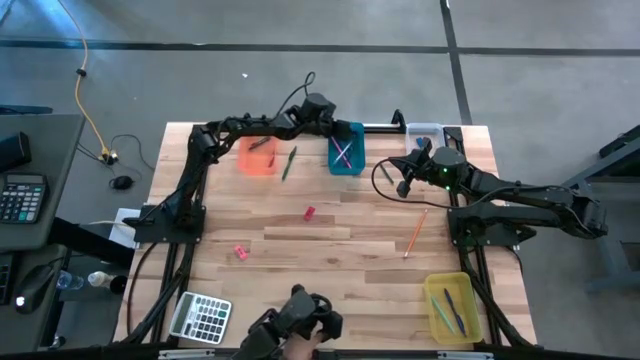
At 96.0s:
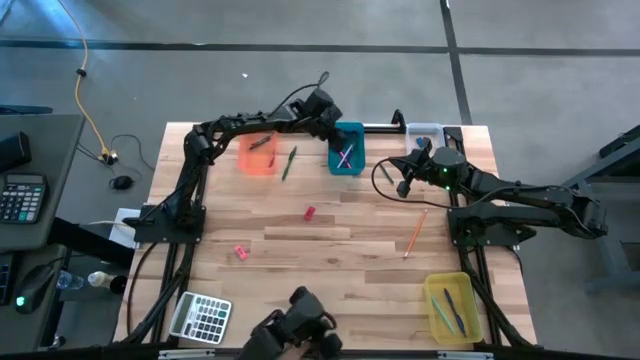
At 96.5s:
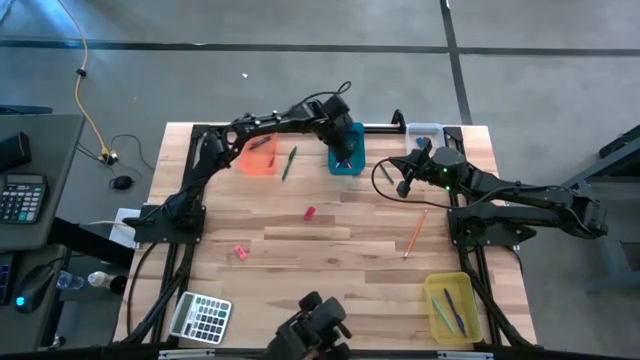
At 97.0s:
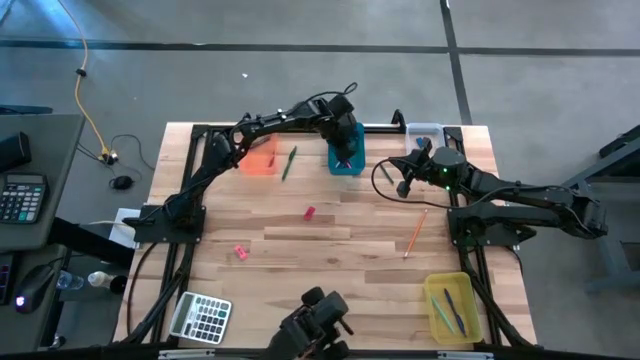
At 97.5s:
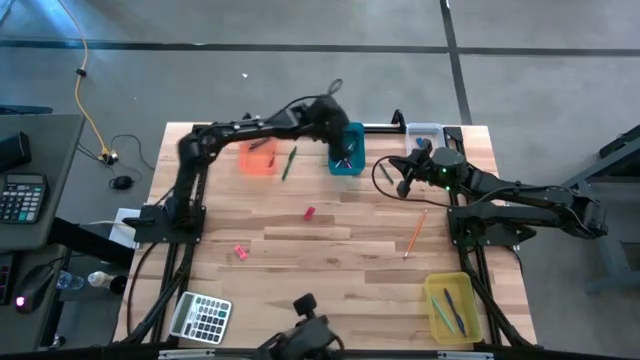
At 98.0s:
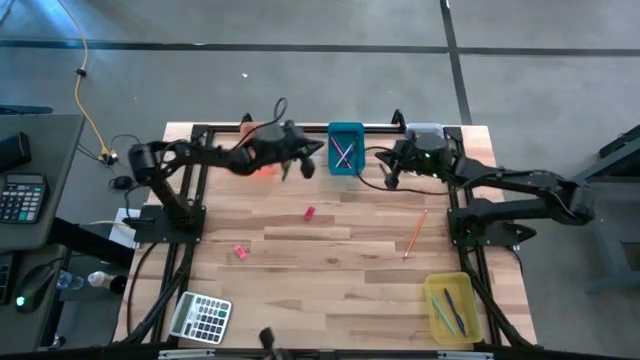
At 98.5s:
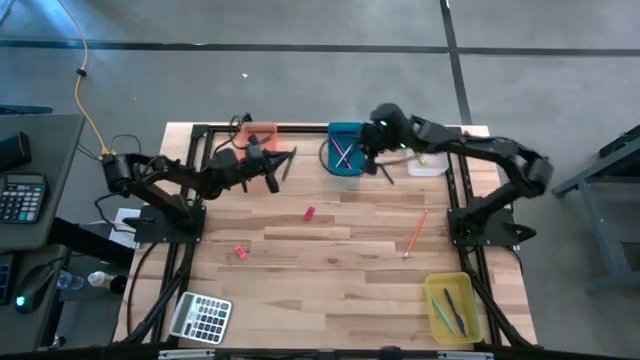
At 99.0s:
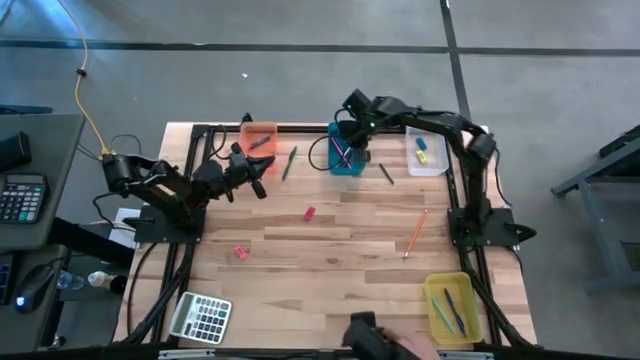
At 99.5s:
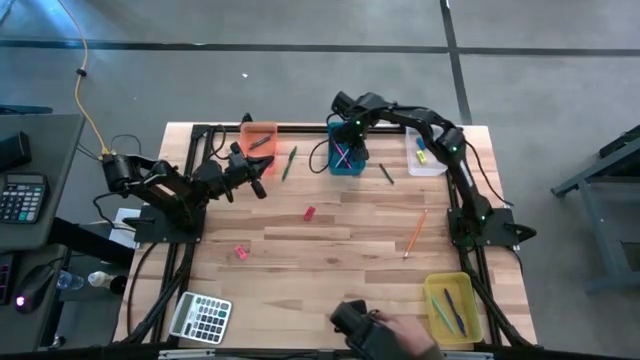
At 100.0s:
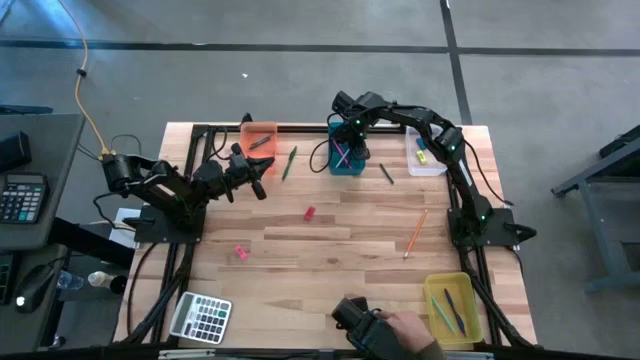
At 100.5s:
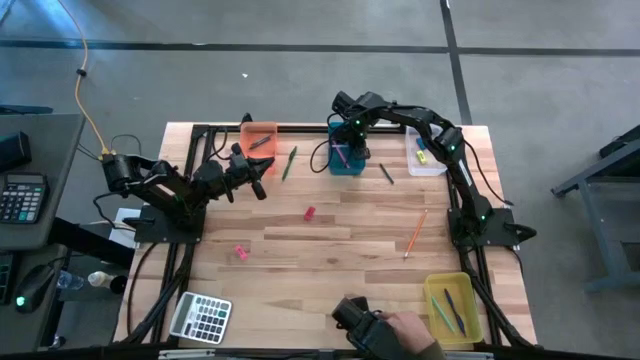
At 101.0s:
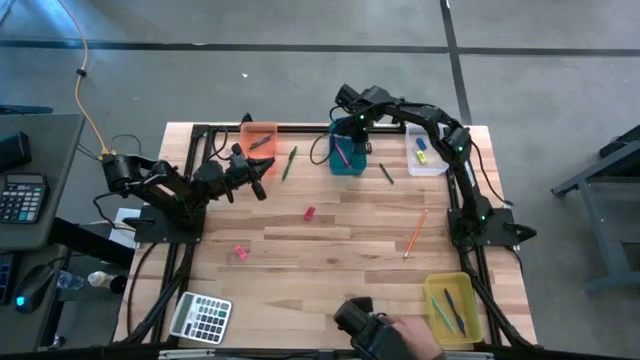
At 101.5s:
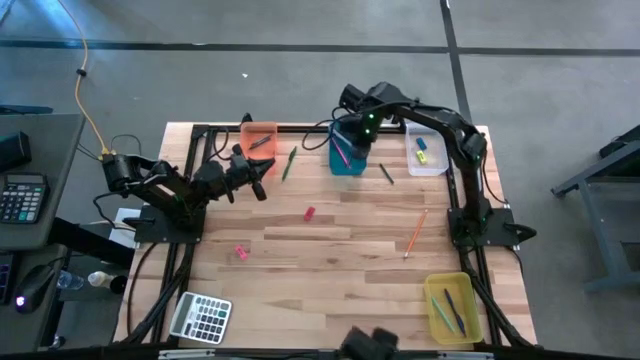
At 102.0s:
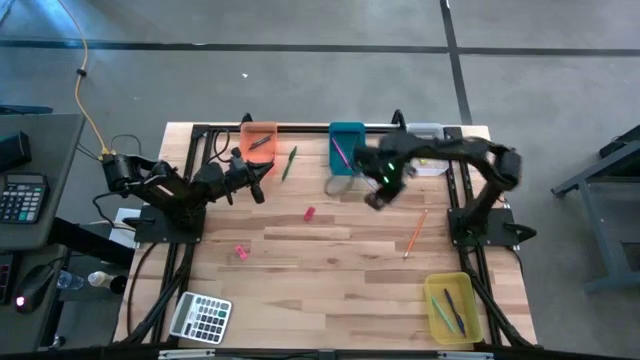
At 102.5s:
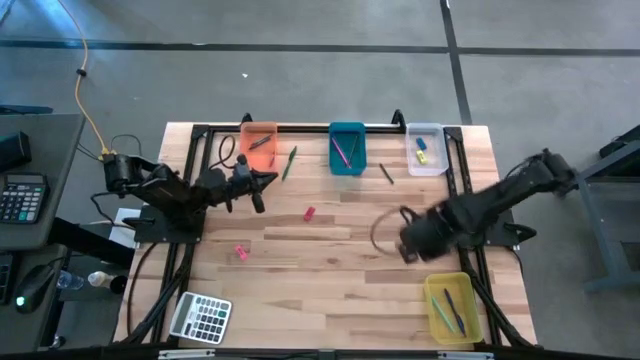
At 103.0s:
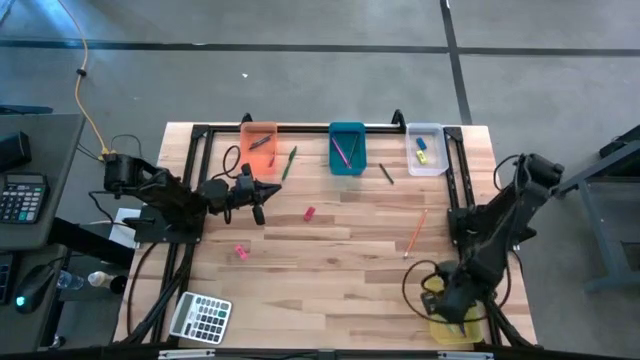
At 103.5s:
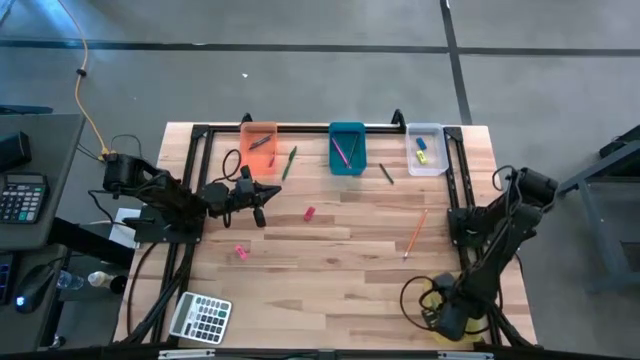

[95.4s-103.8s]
Task: Sort crayons/erasers/pens/pencils in bins
Put the purple pen into the yellow transparent bin from the blue bin

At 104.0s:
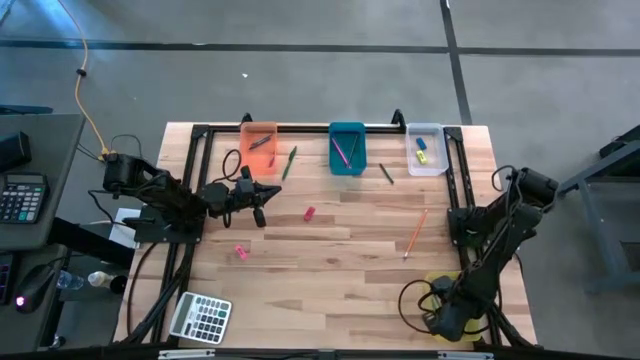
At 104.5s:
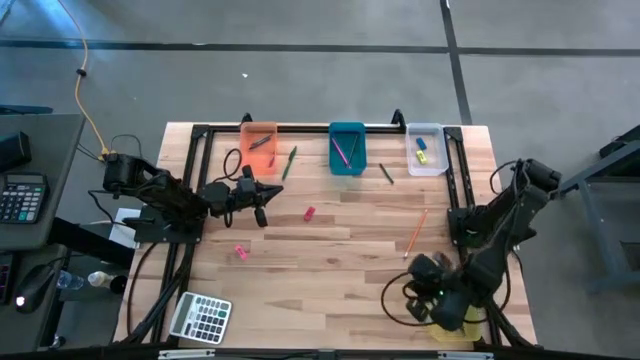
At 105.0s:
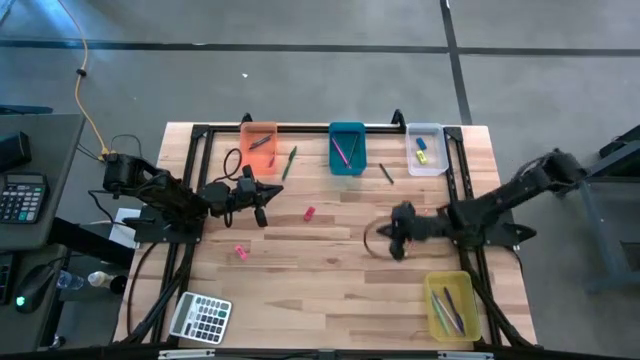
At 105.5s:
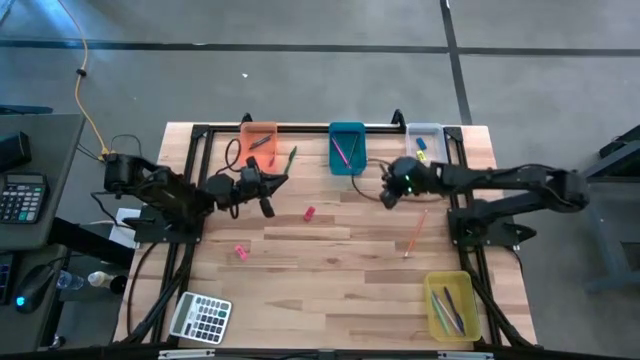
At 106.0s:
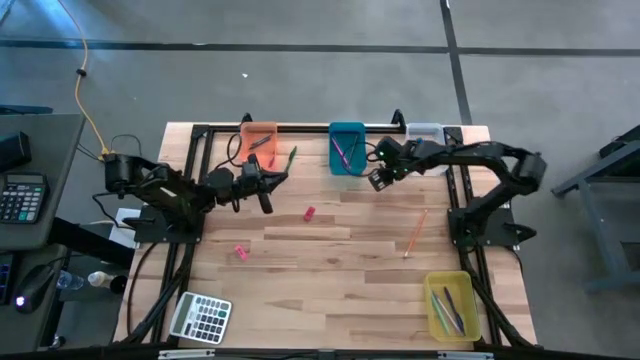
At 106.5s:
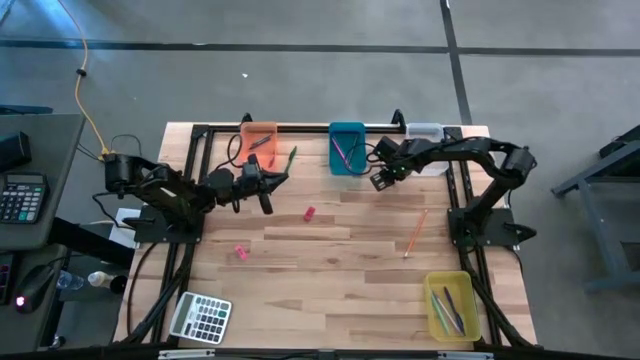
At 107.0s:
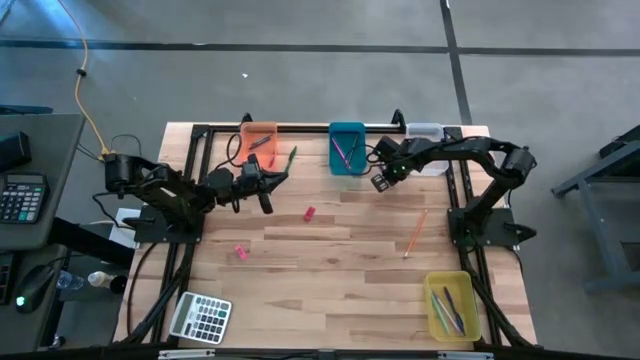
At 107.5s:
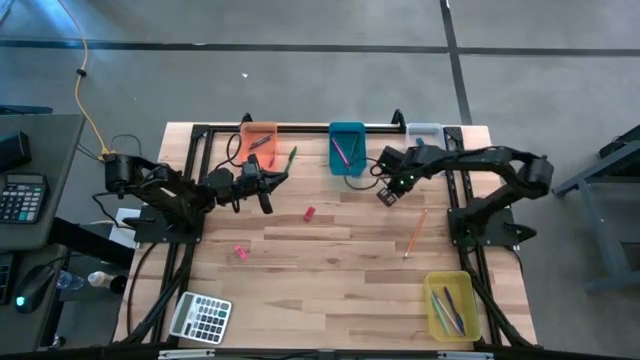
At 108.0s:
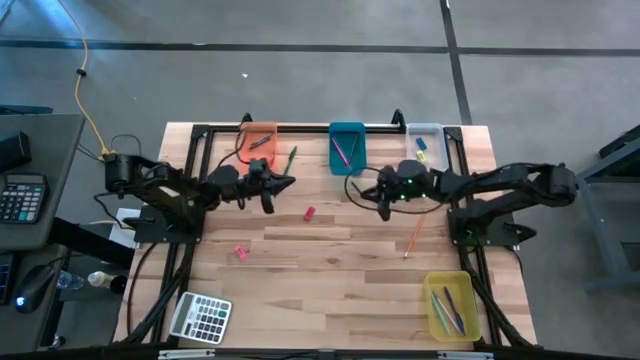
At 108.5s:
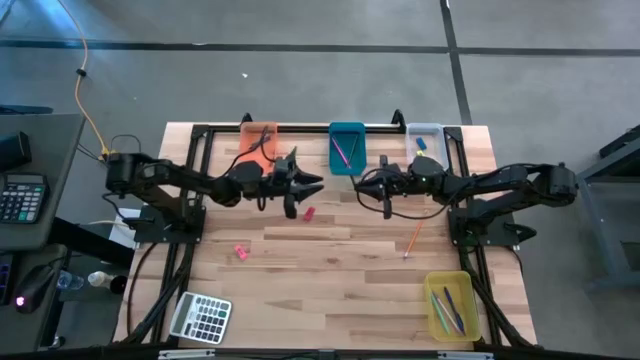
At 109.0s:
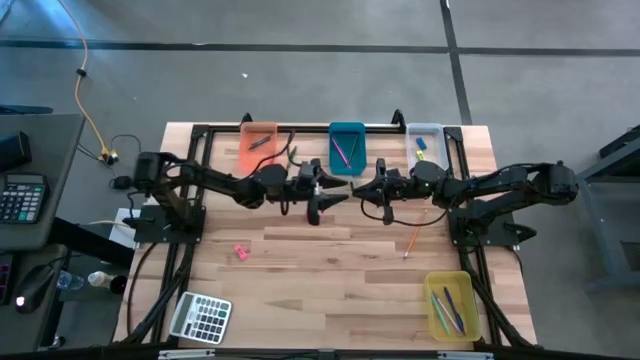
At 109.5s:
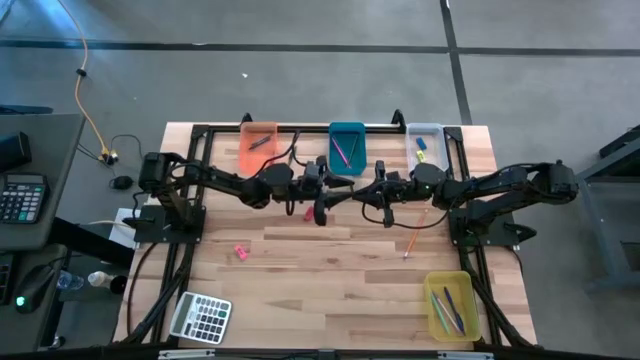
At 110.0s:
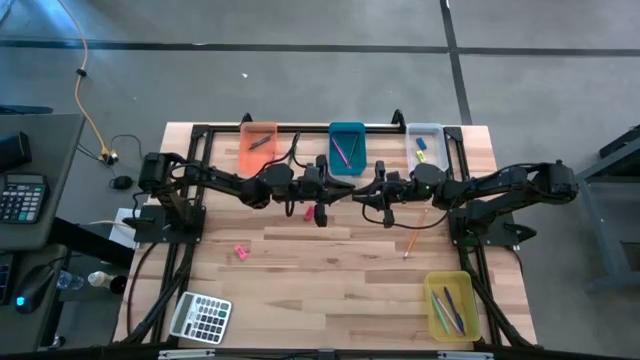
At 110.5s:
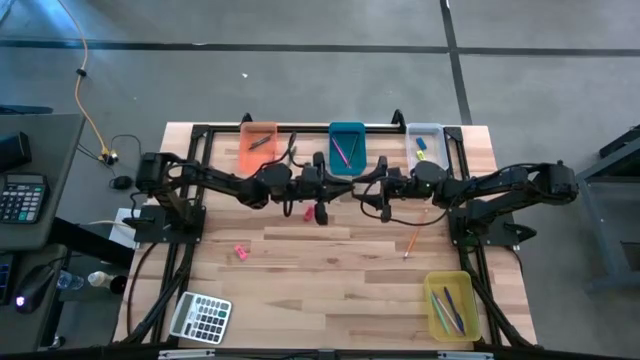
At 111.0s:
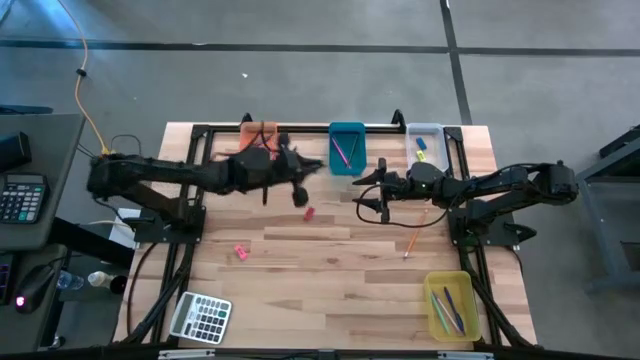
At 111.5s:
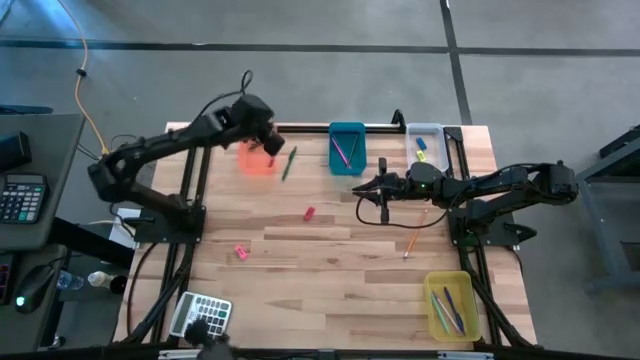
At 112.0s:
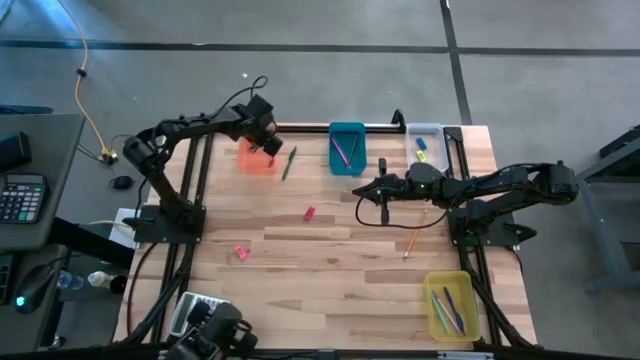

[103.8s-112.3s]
Put the green crayon into the orange bin

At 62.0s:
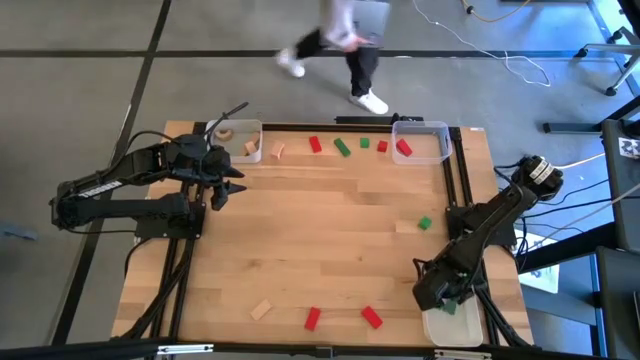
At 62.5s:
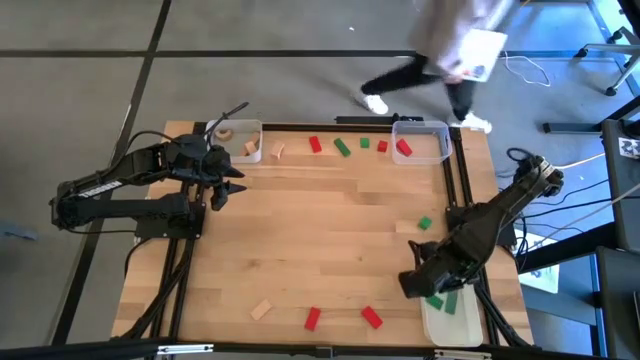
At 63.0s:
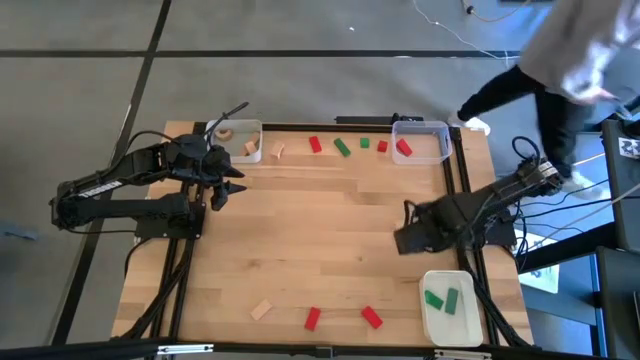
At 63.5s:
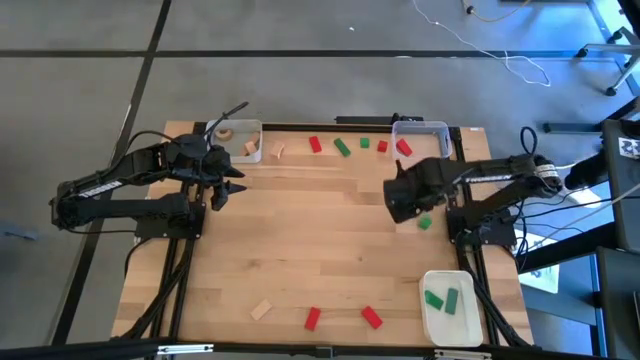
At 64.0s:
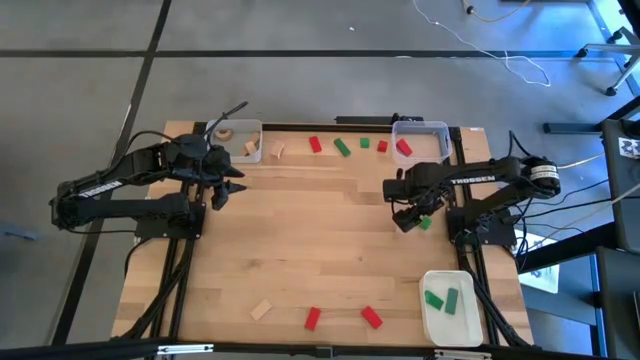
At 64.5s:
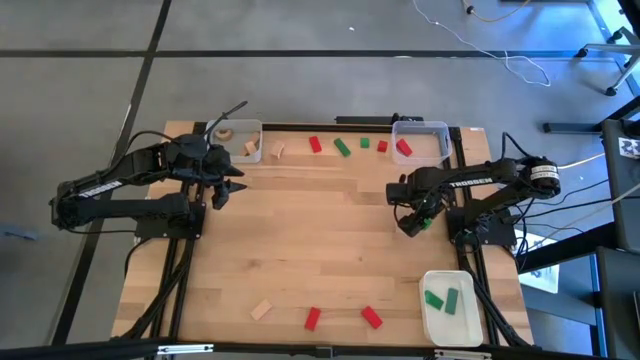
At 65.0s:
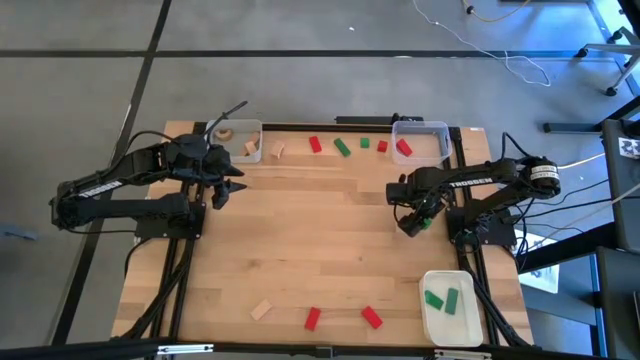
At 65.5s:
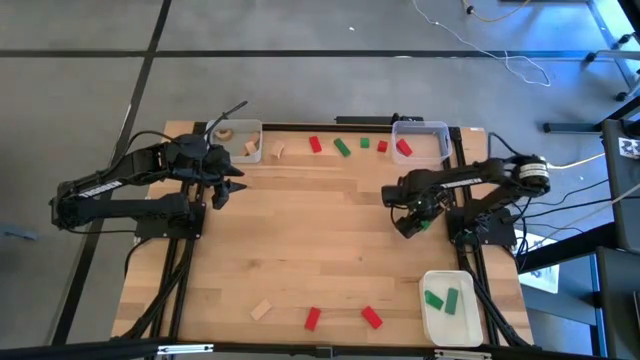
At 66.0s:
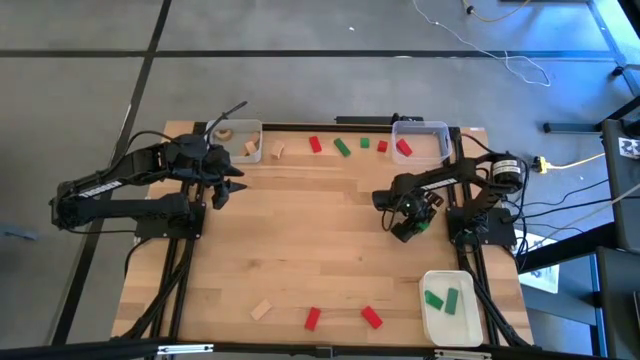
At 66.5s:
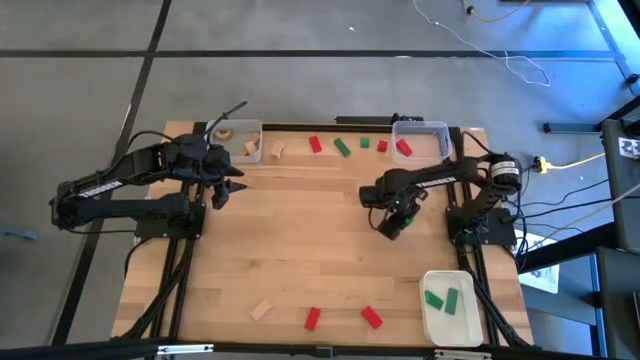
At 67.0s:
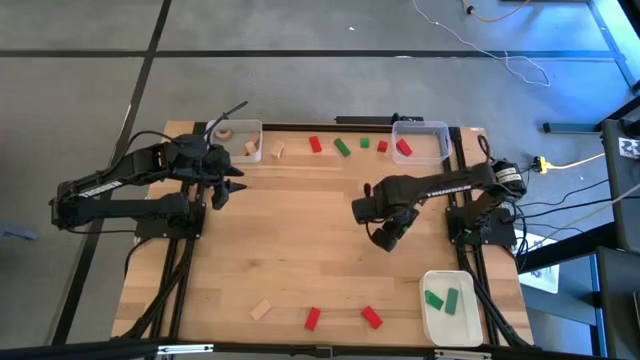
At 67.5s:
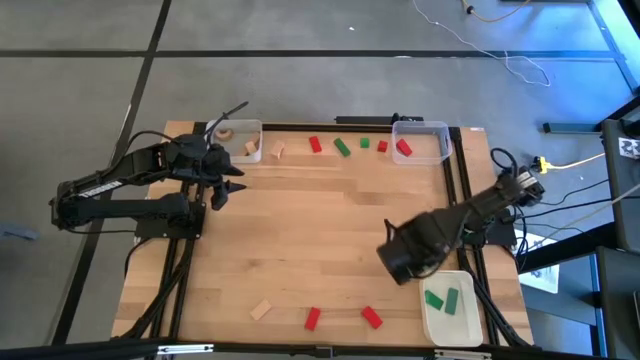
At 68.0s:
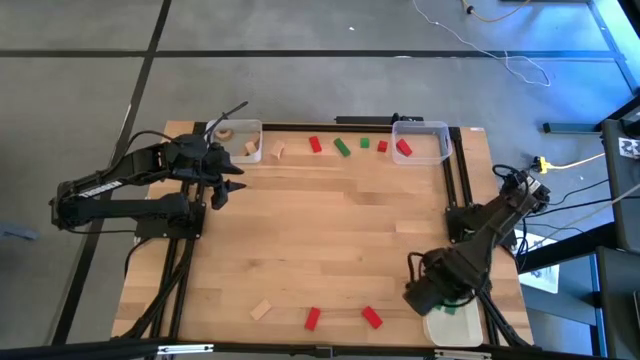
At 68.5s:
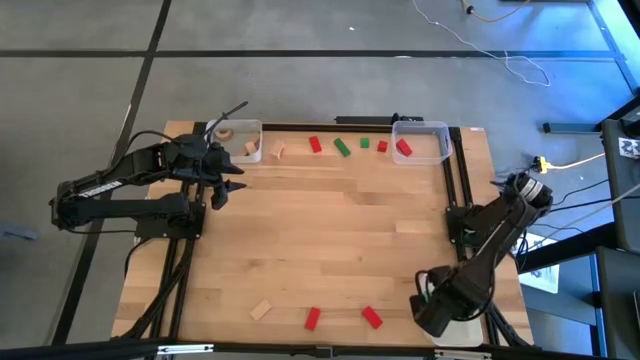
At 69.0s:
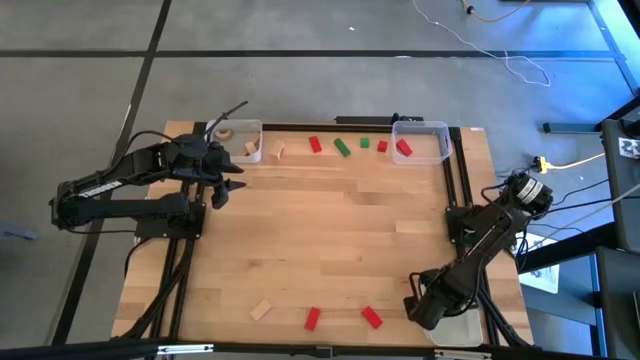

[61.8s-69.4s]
Task: Sort & place blocks by color
Put the green block into the white bin
